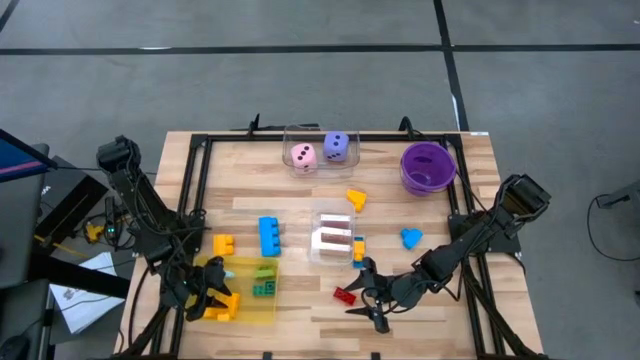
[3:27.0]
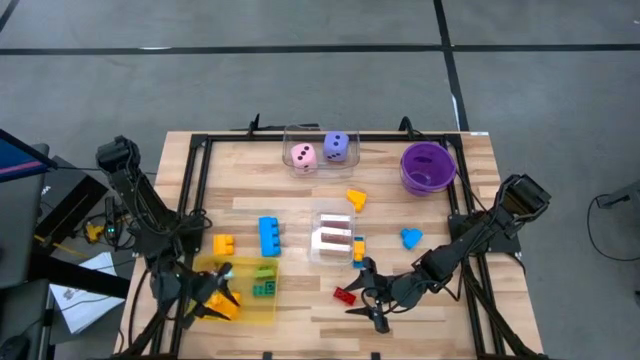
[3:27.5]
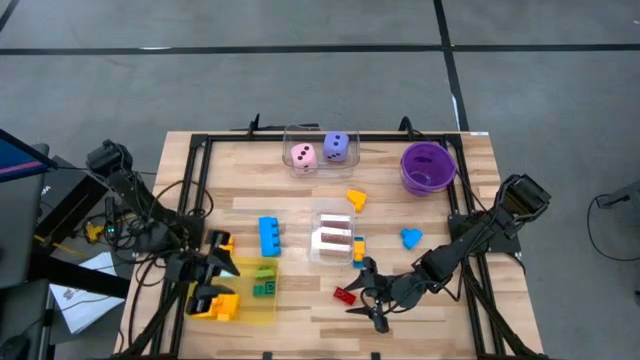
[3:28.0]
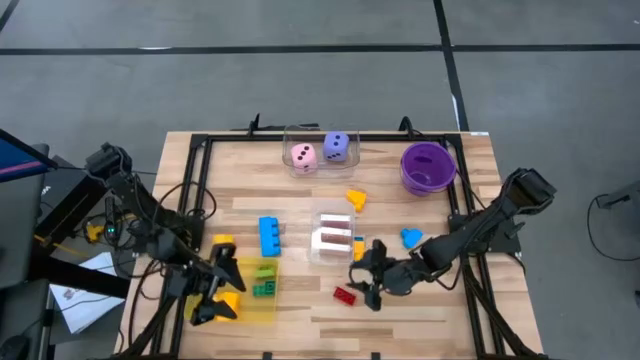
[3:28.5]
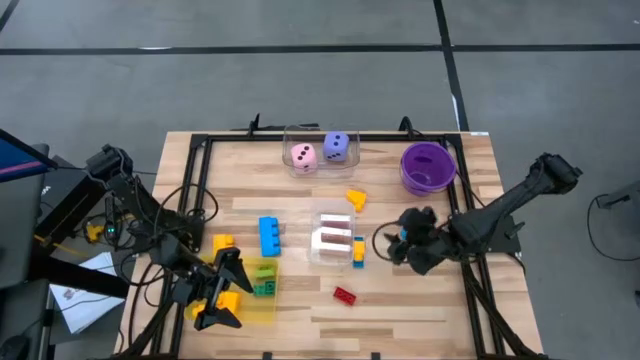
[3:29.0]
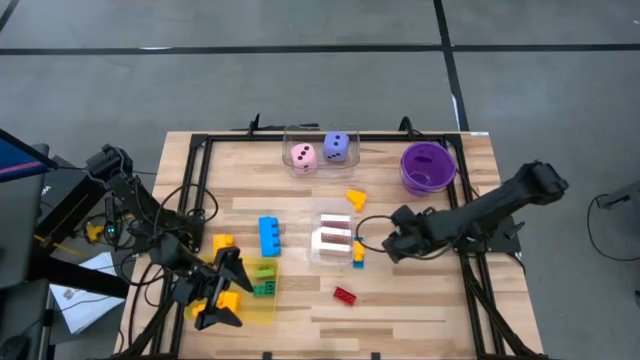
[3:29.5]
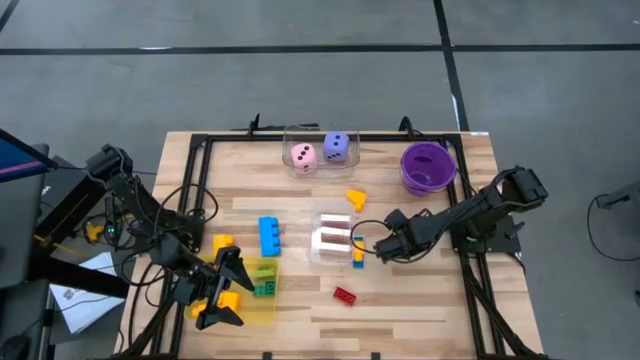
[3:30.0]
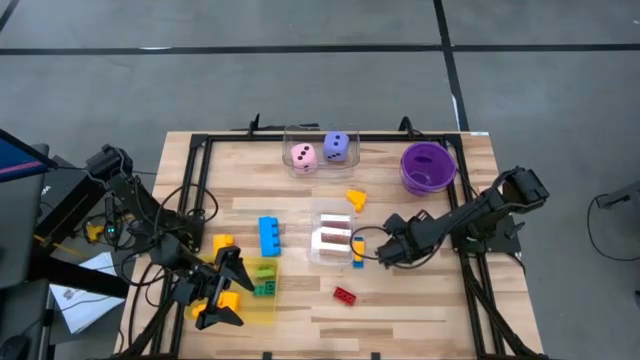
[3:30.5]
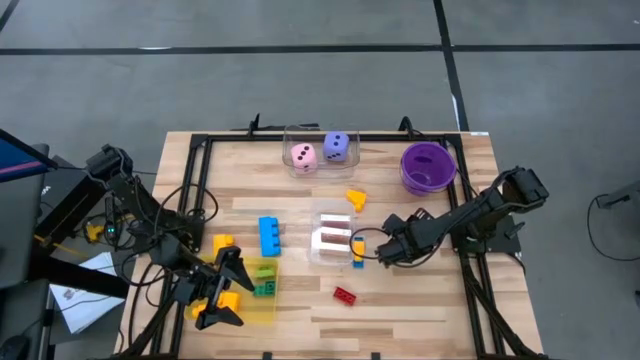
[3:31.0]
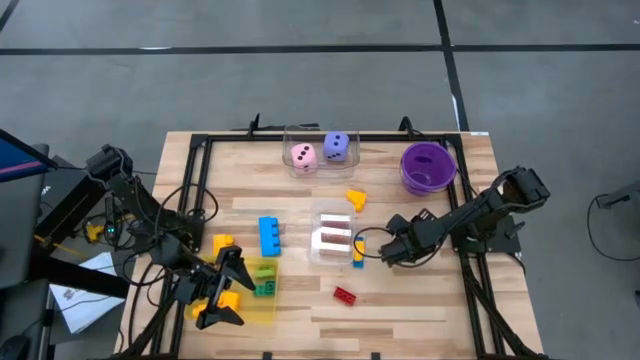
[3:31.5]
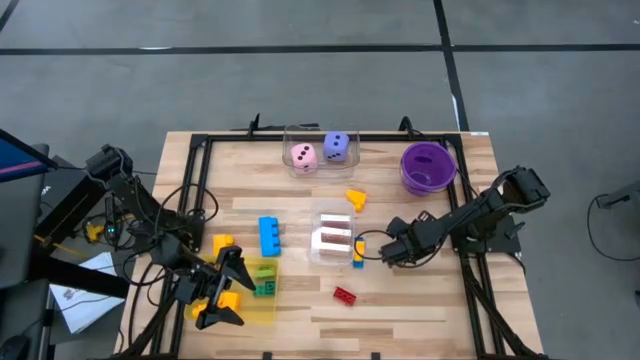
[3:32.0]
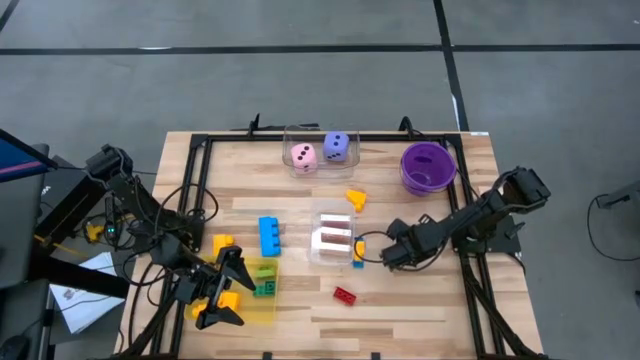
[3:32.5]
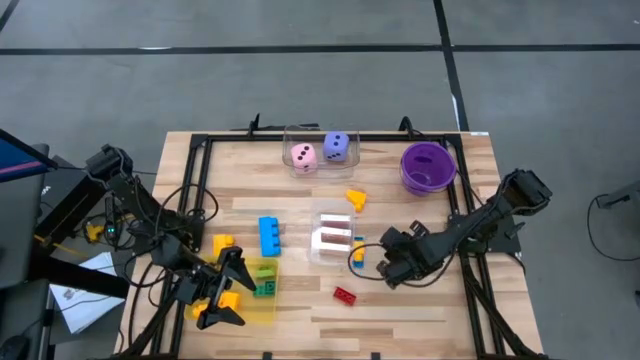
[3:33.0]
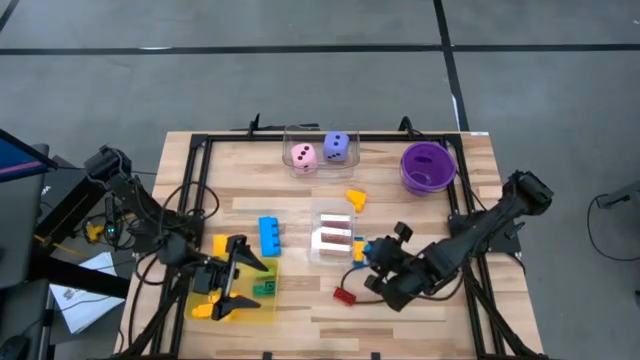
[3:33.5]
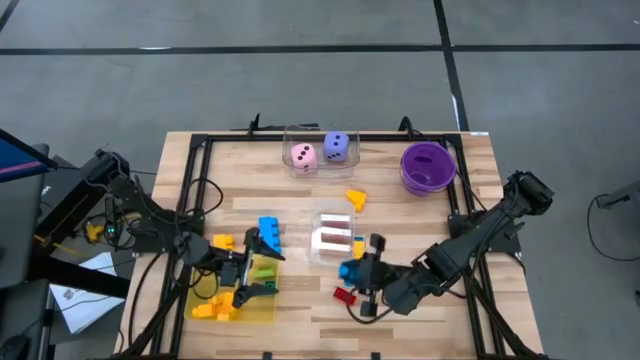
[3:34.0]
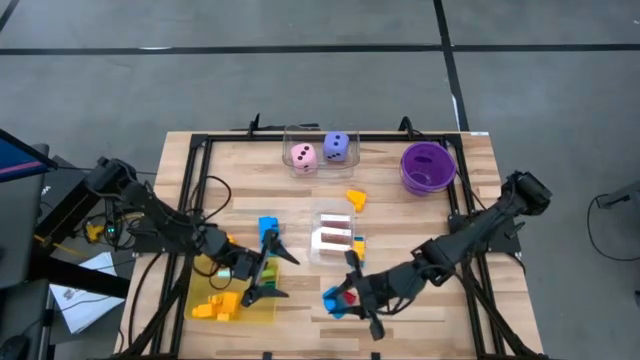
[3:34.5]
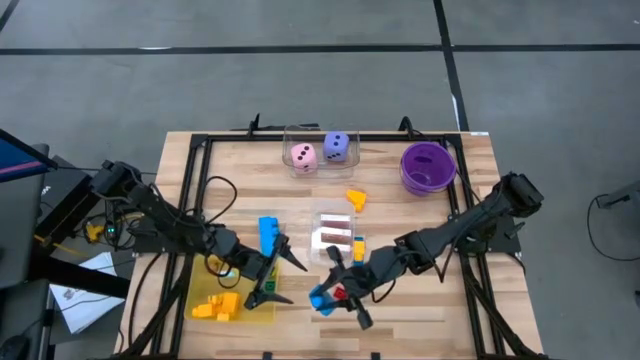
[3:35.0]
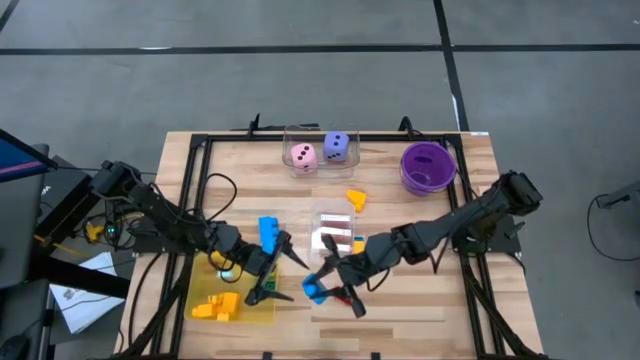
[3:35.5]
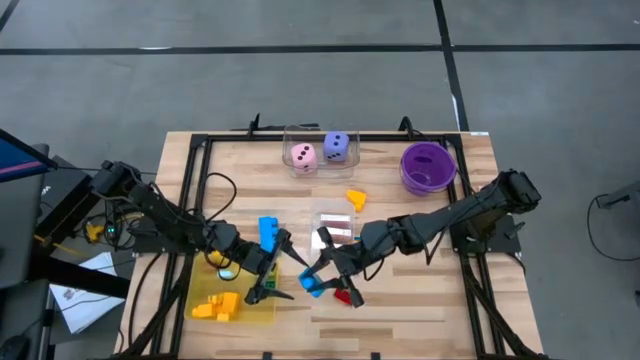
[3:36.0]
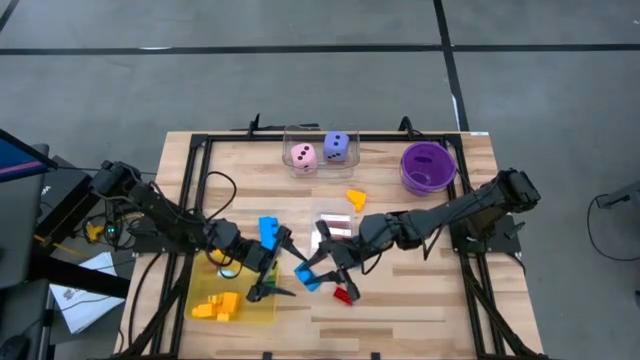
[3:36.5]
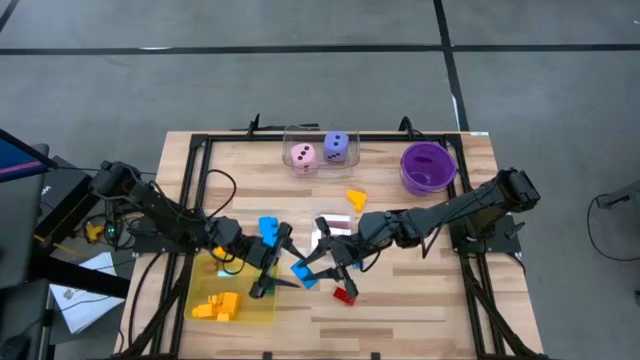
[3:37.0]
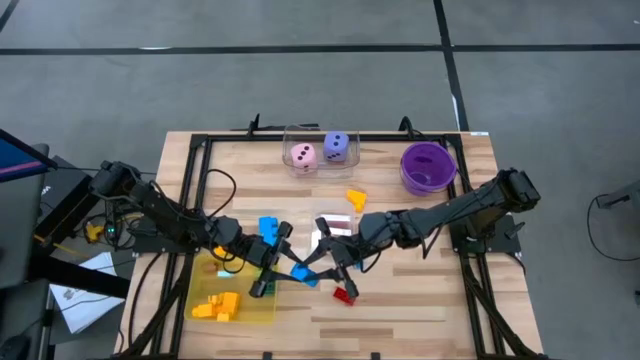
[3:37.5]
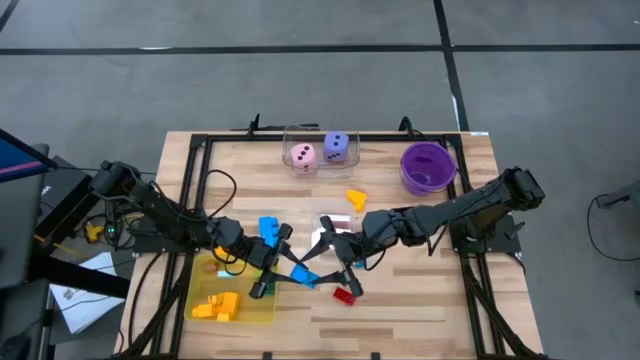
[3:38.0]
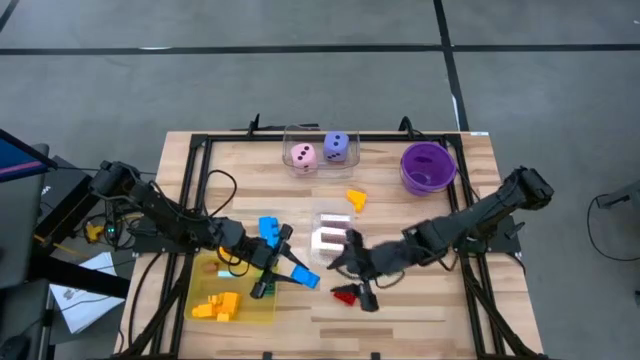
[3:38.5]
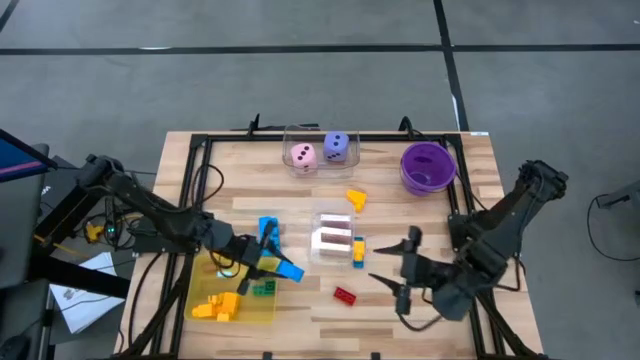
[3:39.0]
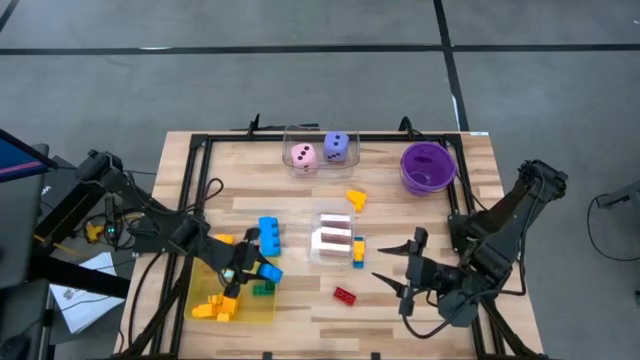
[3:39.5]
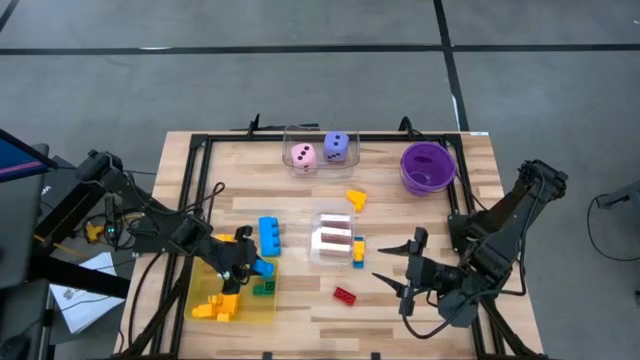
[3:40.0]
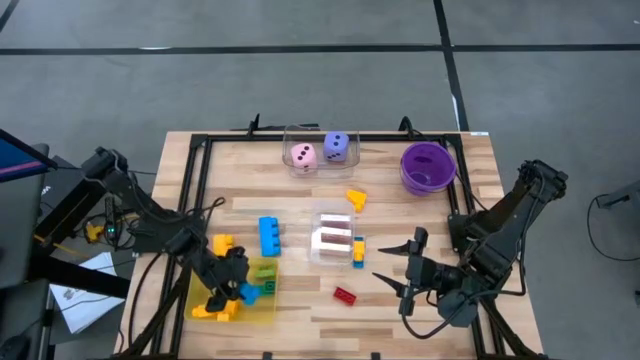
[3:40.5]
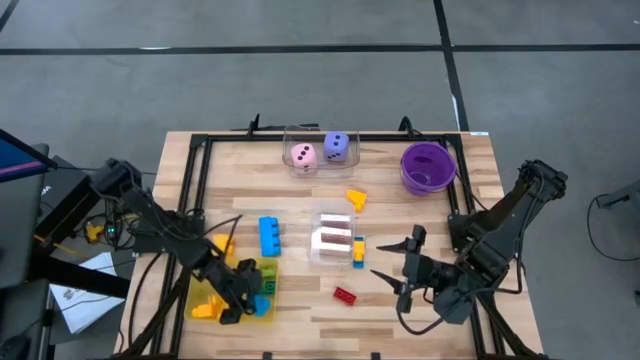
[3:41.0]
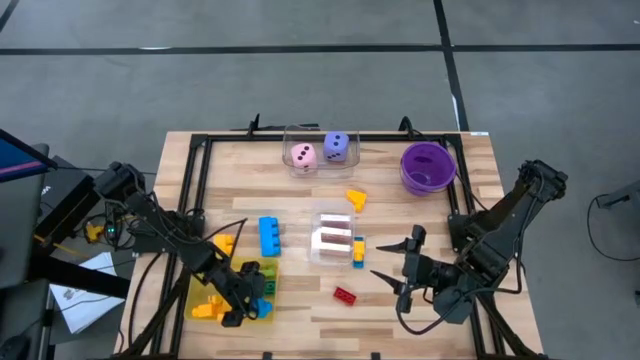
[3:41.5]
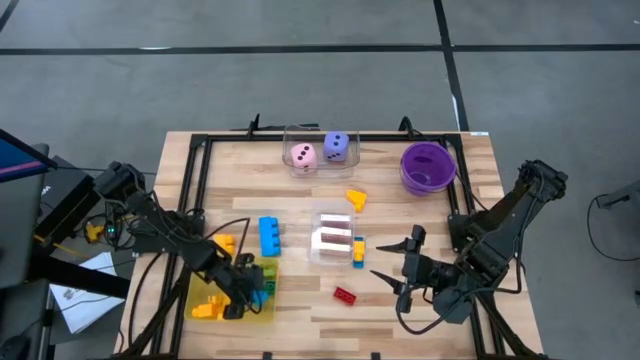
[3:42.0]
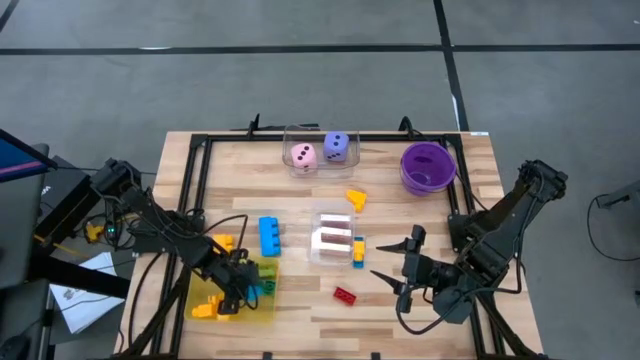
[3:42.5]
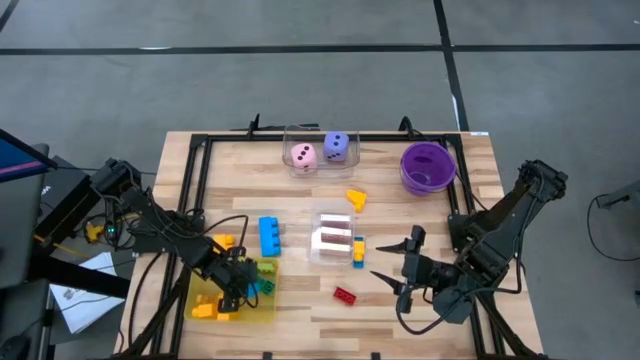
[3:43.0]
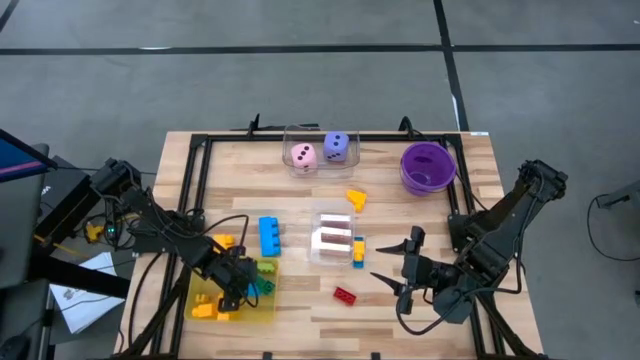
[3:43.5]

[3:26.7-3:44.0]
Task: Pick & Place Toys
Put the light blue game piece into the yellow bin

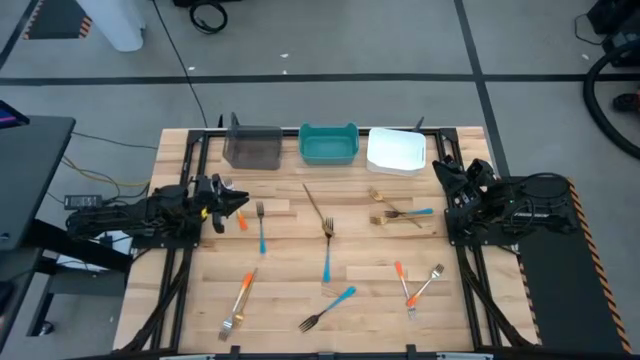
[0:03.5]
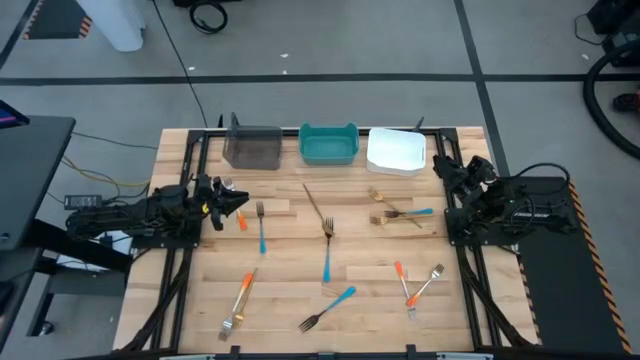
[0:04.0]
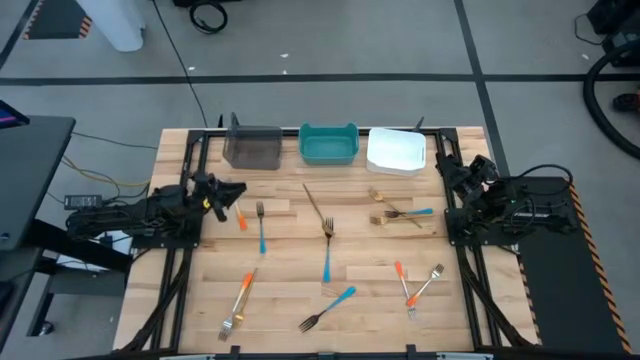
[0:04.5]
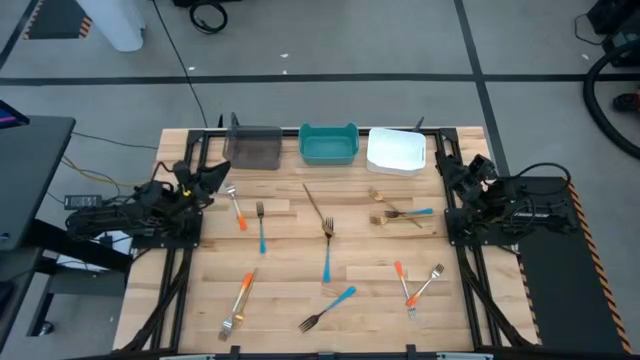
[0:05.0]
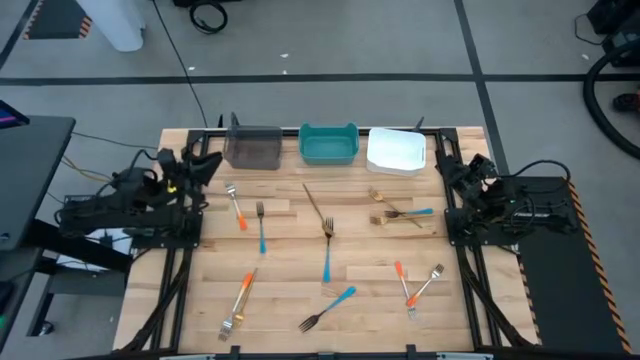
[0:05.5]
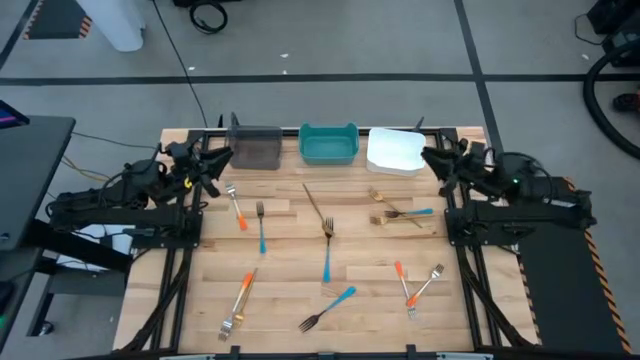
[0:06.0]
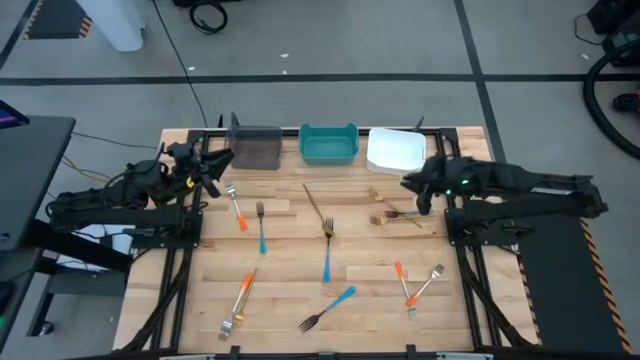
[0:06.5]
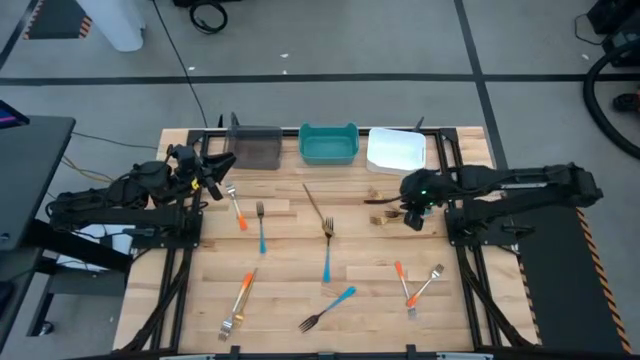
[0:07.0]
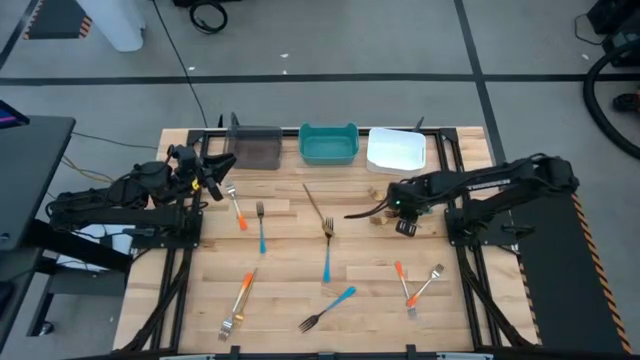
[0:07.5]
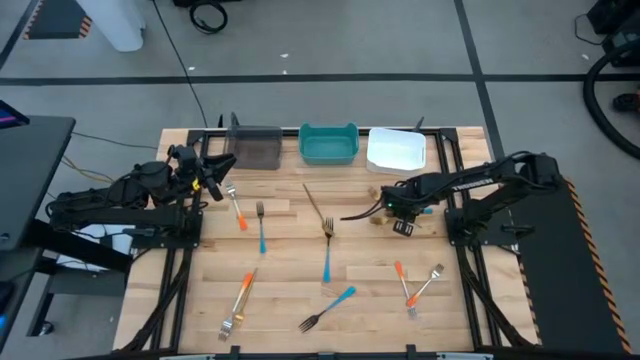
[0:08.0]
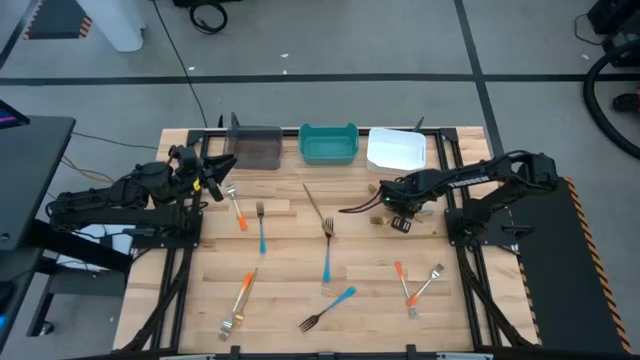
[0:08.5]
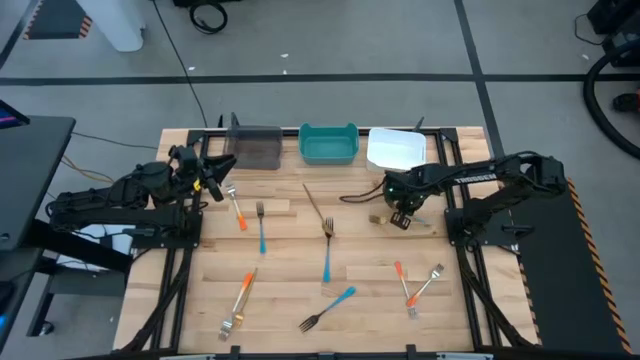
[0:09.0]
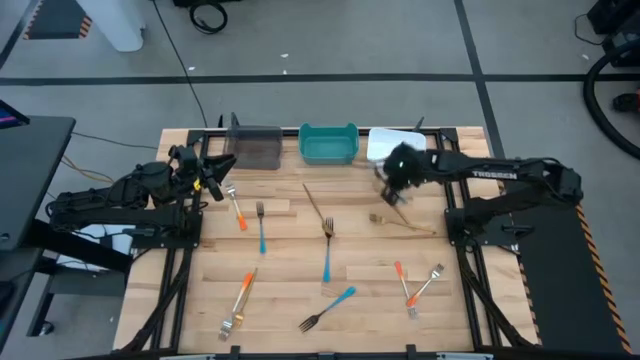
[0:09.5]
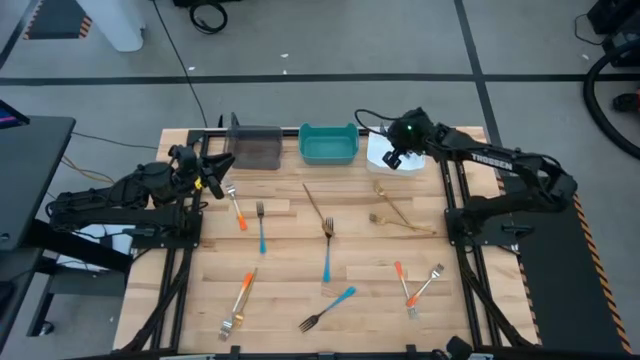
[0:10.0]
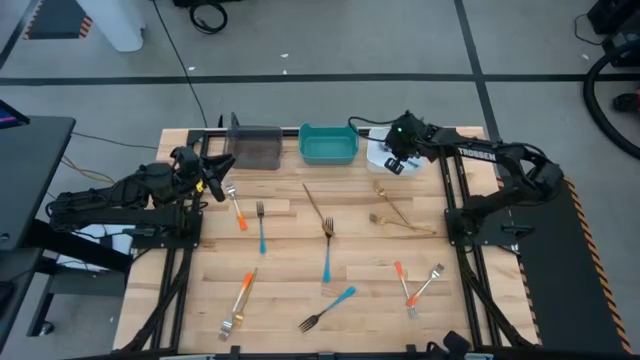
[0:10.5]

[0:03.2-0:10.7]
Task: Sort silverware by color (type)
Put the top right blue fork into the white bin
